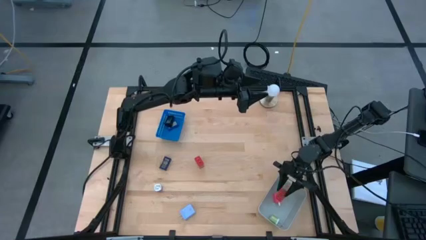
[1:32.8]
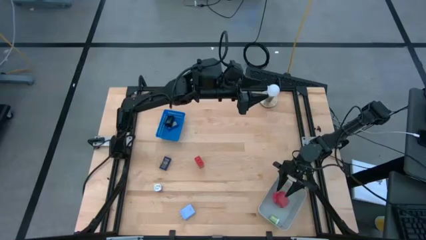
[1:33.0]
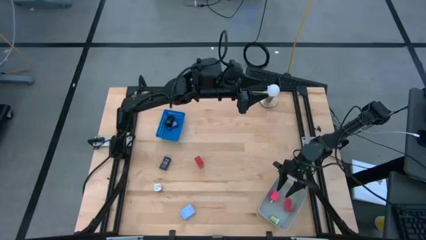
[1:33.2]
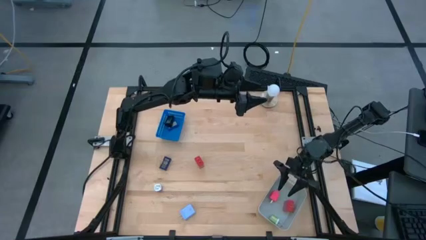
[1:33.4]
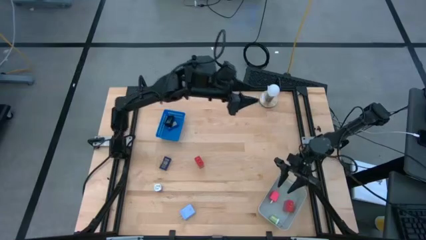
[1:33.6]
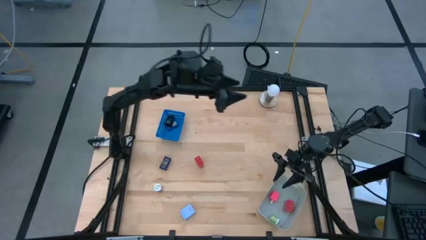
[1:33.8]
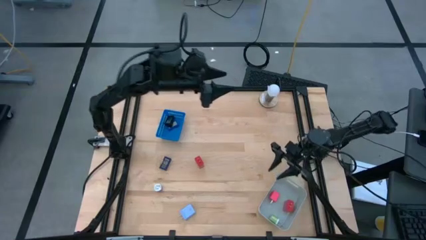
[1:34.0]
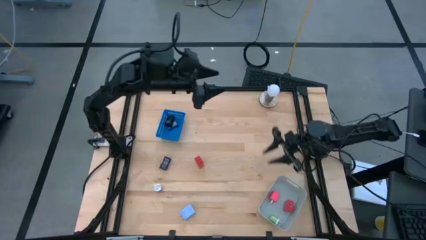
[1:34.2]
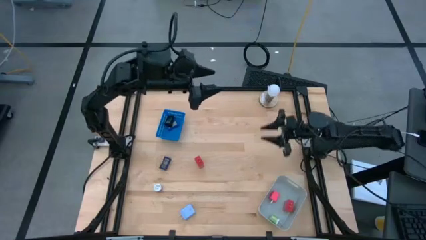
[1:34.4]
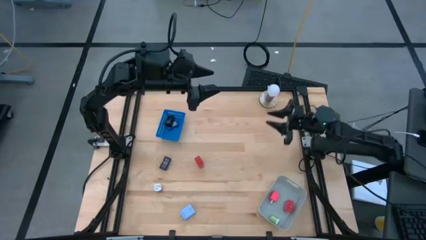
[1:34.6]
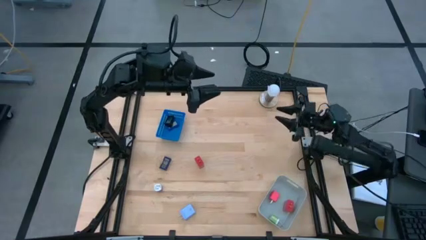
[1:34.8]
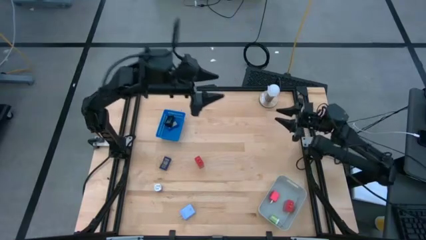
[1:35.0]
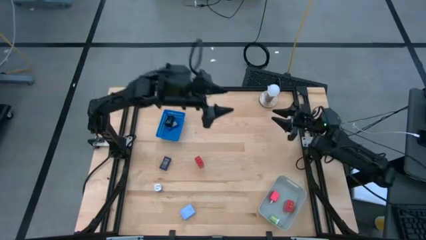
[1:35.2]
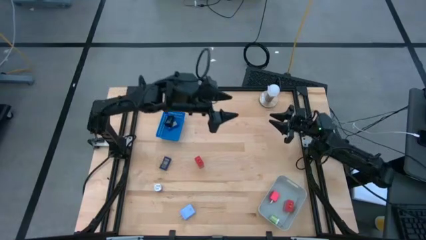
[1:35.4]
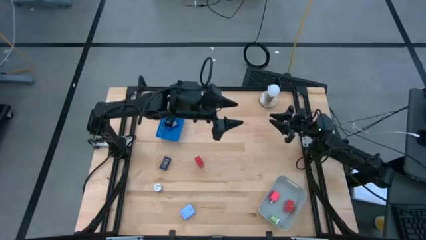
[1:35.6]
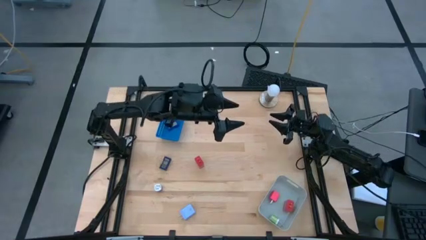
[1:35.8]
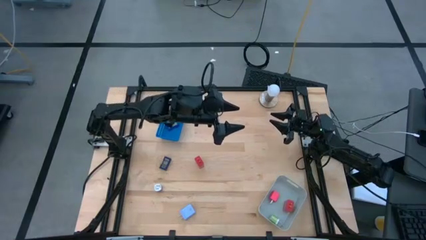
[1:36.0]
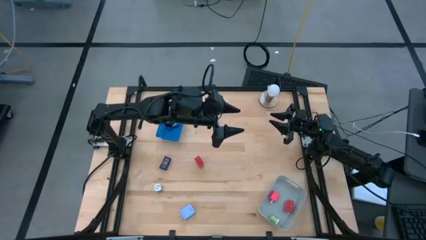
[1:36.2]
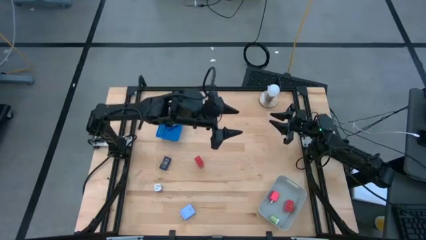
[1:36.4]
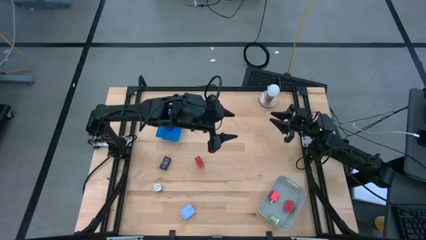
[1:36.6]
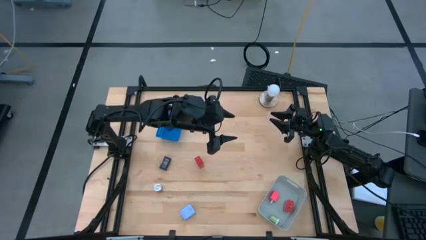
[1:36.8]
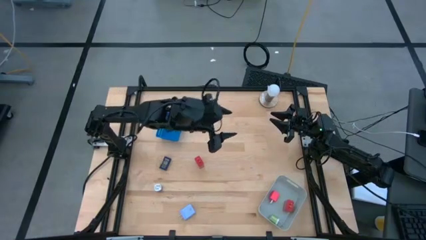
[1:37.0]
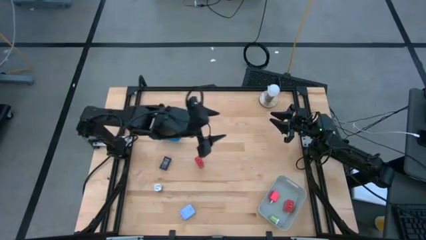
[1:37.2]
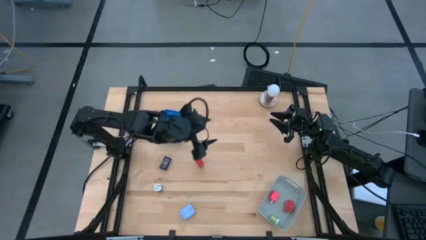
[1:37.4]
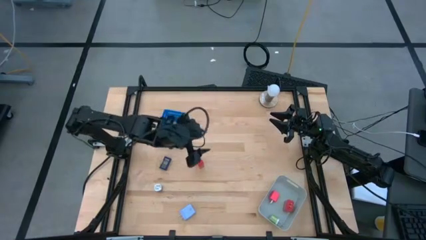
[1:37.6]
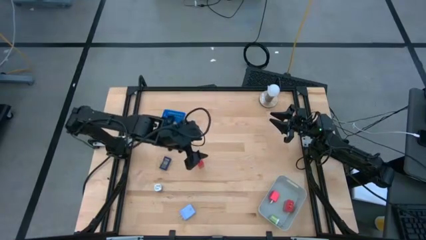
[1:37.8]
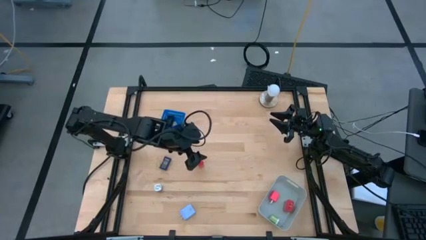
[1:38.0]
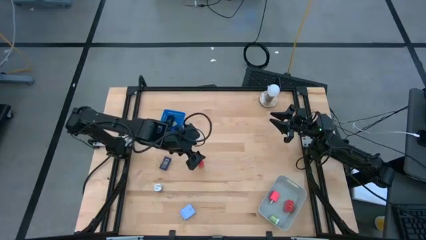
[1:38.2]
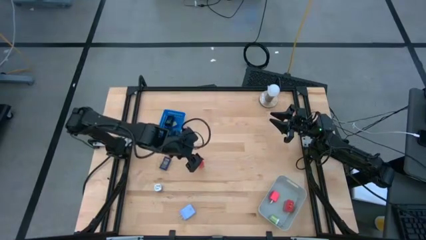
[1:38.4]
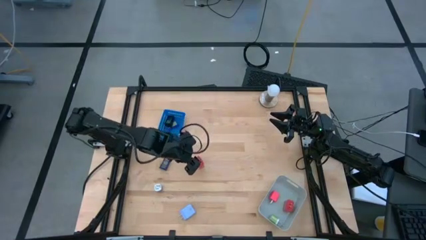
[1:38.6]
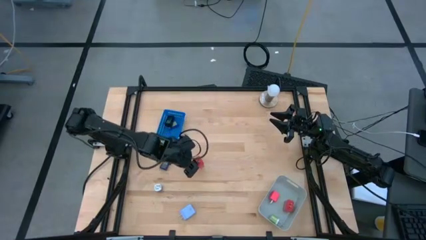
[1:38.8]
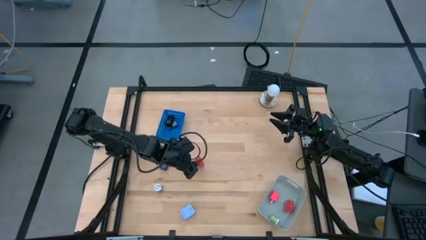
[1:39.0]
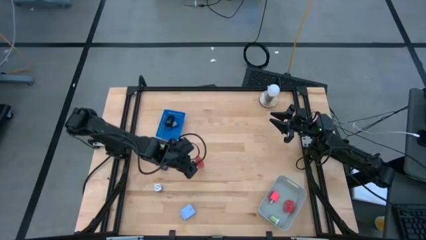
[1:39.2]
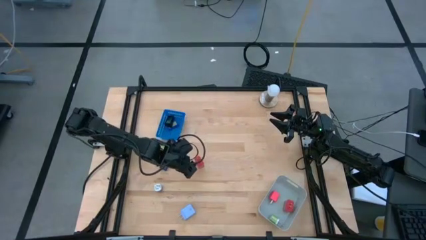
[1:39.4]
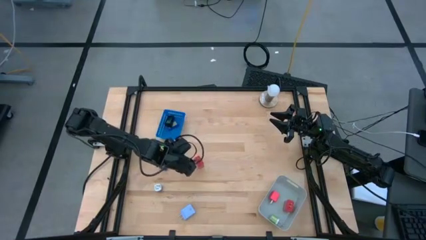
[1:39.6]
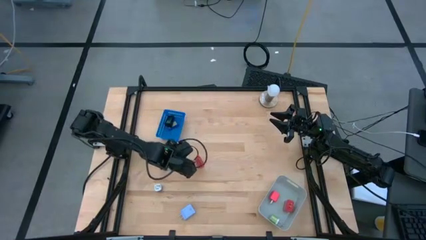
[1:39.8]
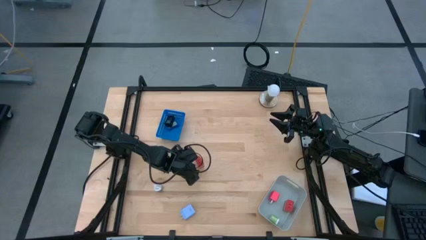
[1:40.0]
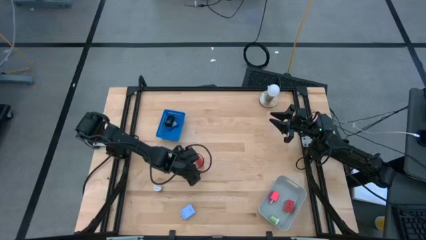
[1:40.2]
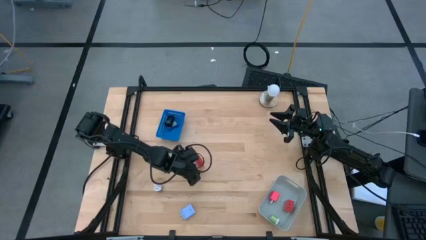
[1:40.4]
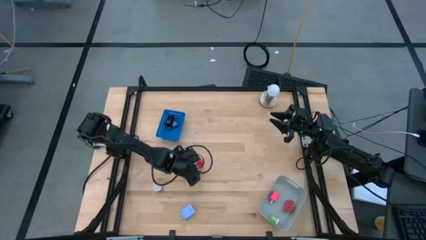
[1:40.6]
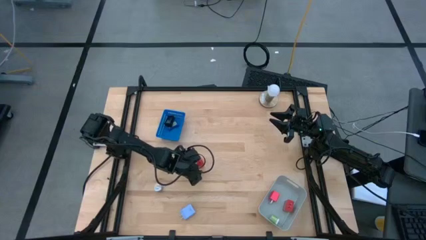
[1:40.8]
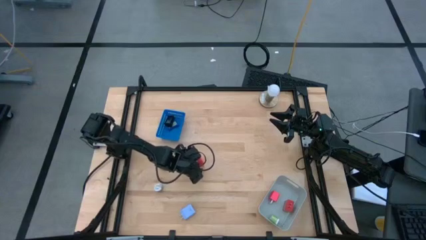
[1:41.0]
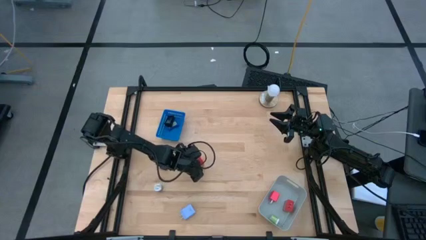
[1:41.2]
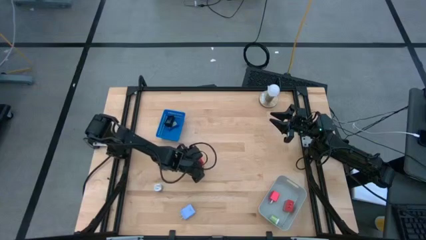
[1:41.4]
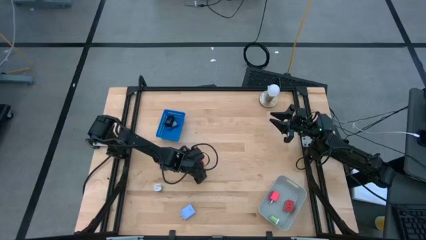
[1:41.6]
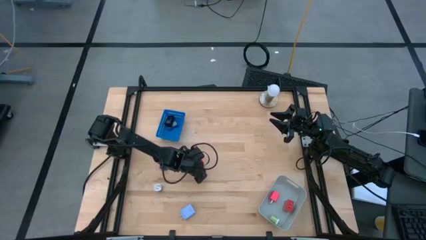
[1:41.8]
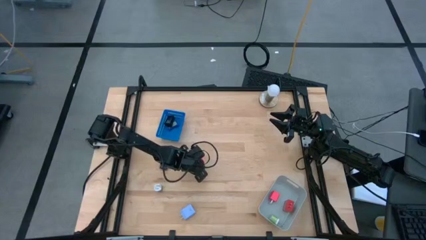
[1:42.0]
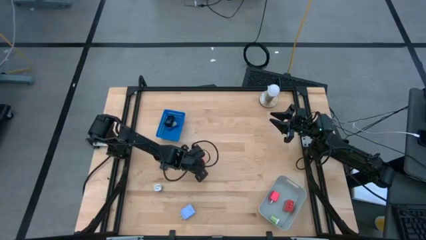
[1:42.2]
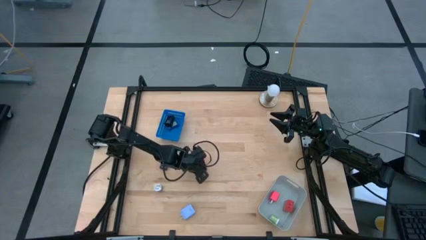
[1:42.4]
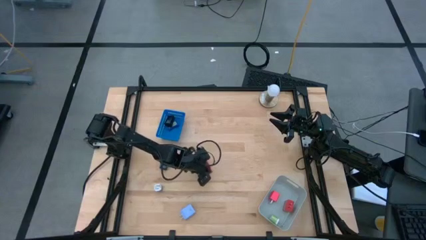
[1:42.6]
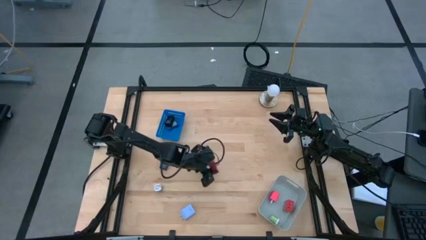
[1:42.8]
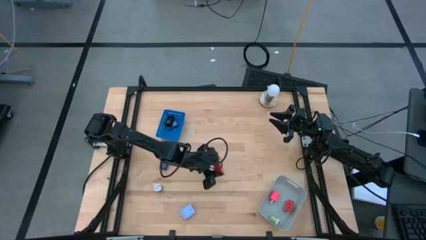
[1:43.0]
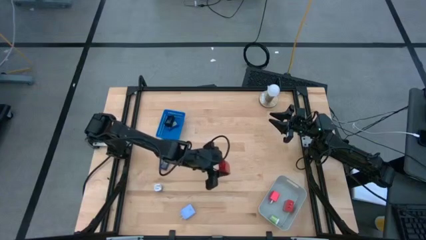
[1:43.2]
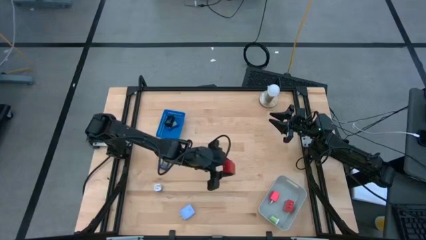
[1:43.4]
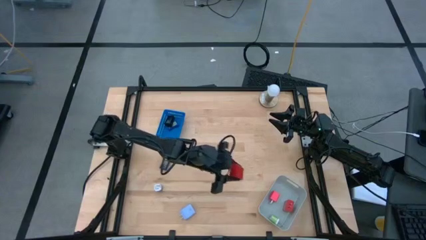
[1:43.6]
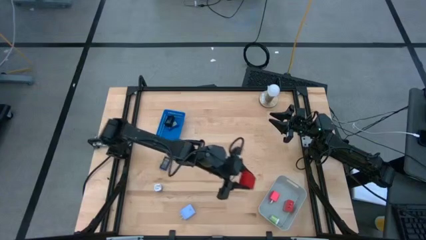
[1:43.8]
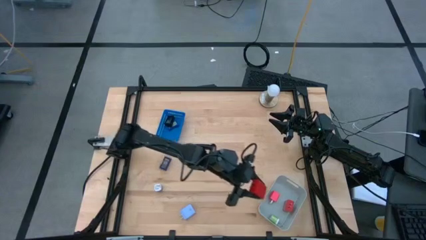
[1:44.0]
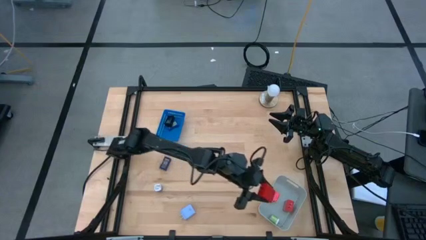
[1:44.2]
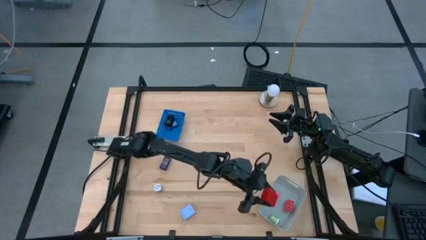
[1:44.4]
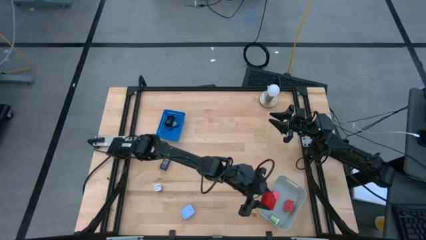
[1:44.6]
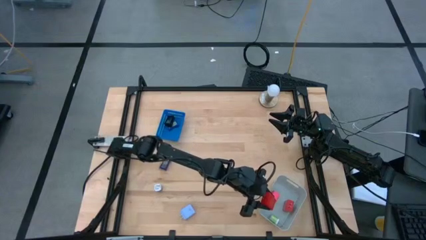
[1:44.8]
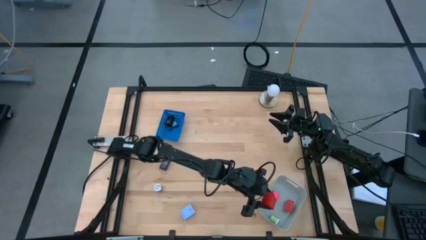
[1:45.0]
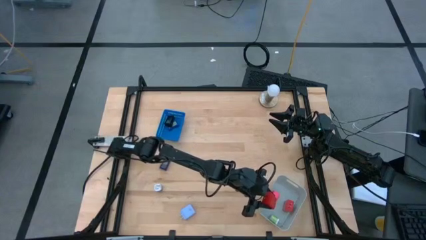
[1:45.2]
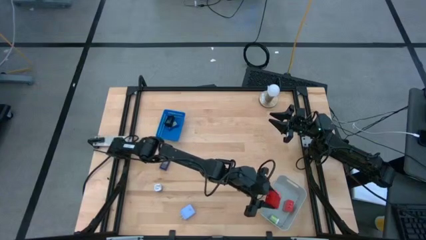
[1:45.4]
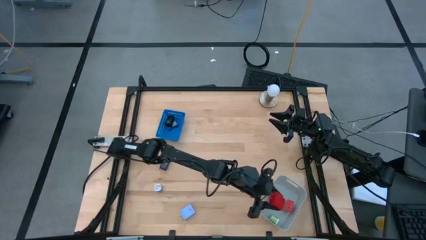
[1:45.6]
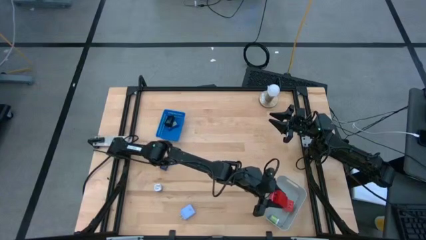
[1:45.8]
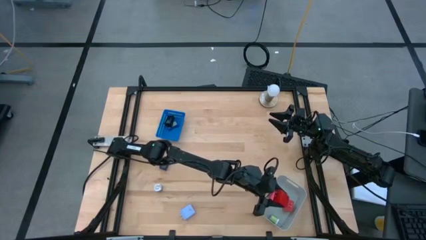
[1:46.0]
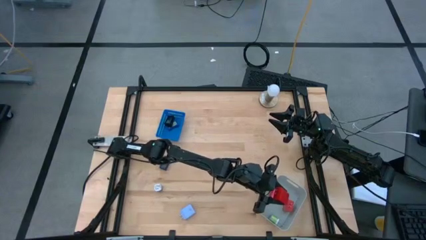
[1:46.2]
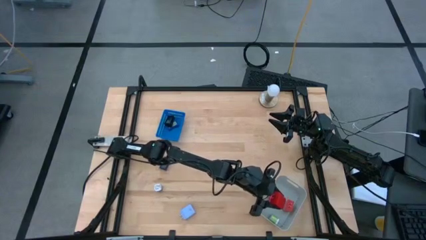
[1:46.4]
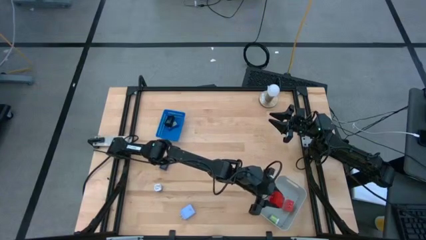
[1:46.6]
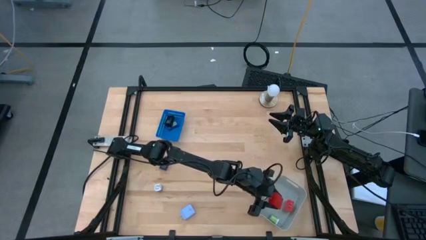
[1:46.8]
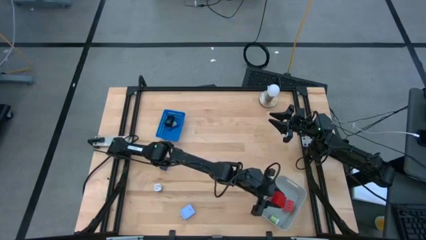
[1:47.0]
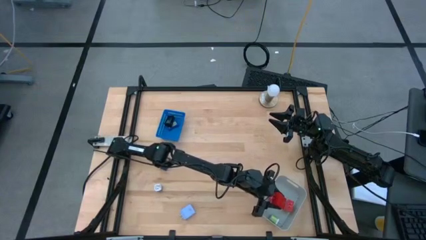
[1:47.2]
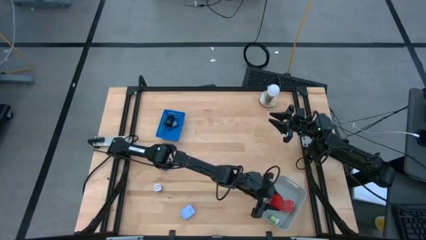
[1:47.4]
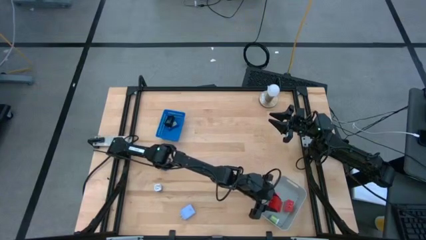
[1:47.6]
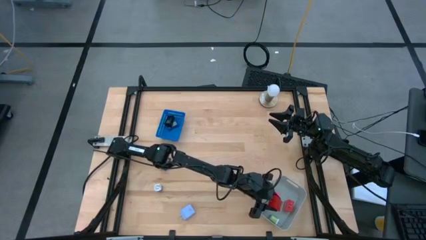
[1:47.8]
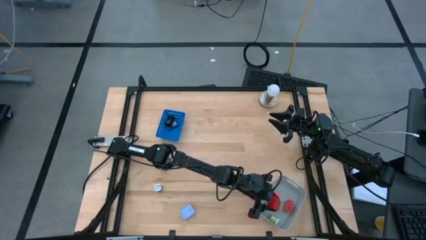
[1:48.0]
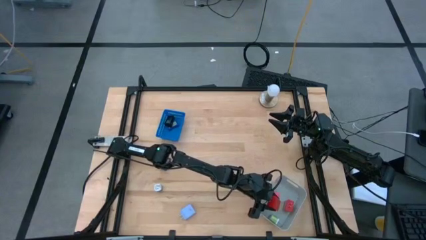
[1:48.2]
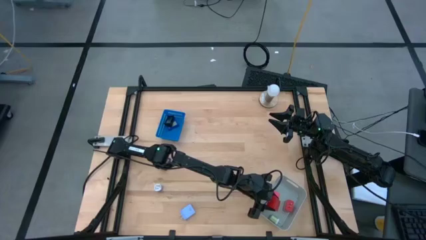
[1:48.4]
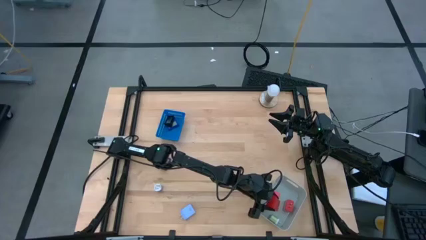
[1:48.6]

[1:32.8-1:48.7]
Task: Pick & Place Office items
Put the red charger adapter into the white bin
